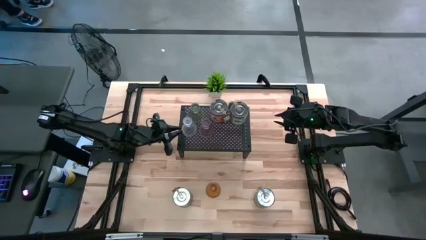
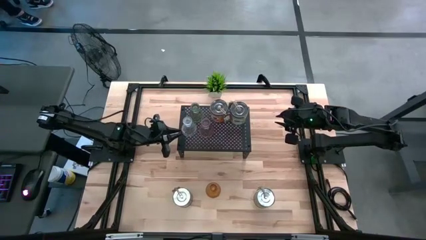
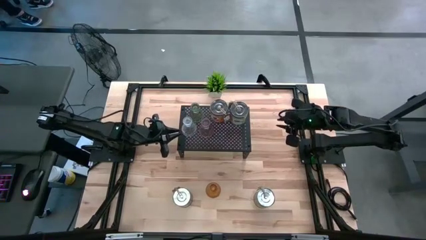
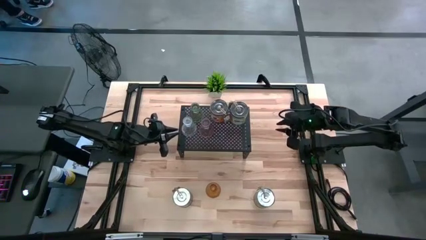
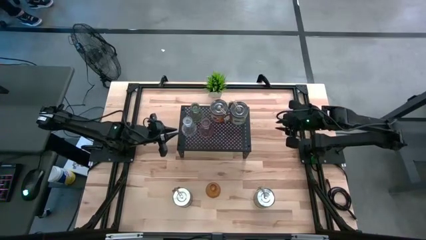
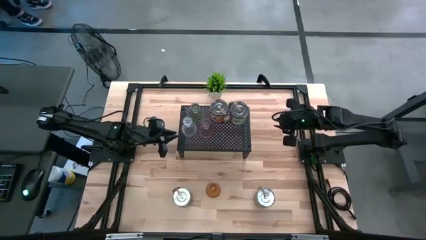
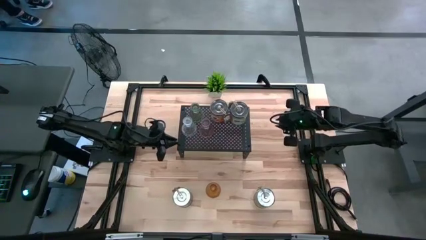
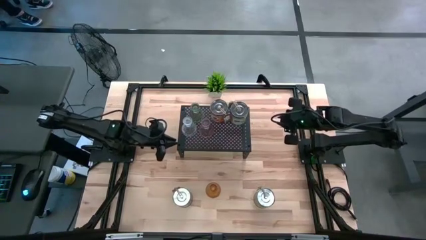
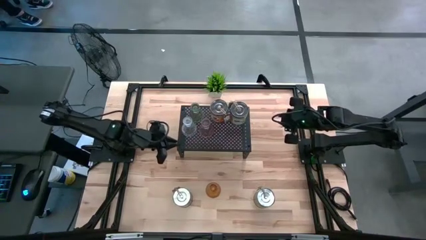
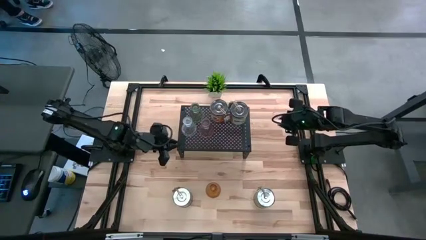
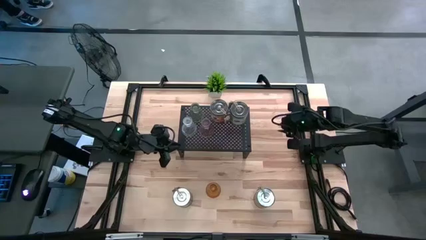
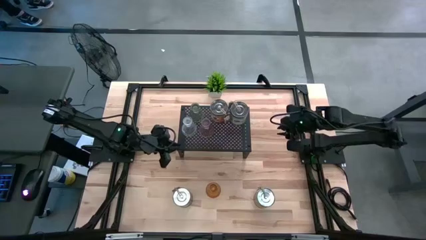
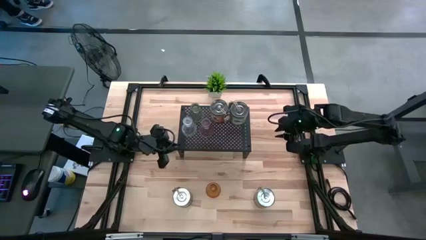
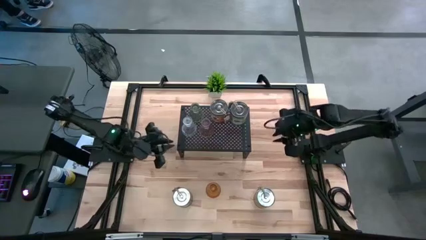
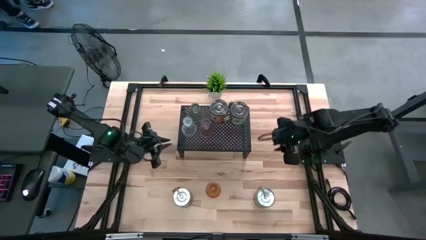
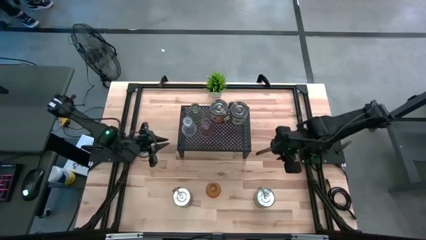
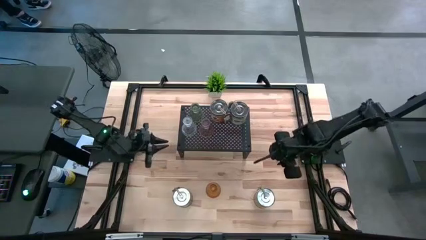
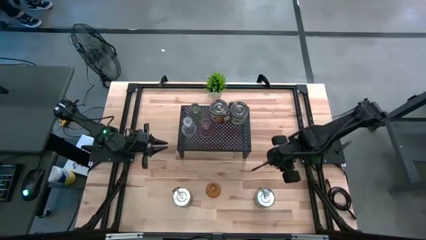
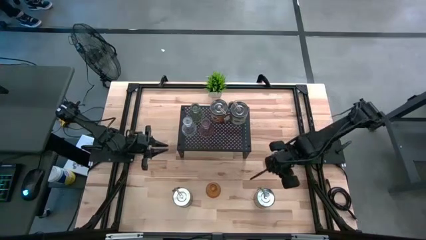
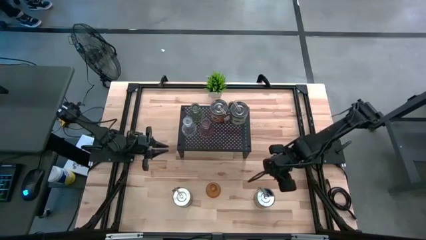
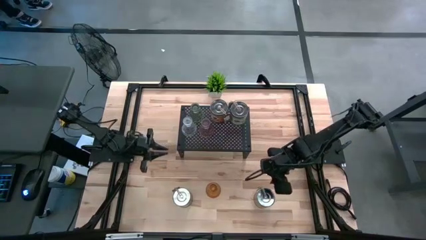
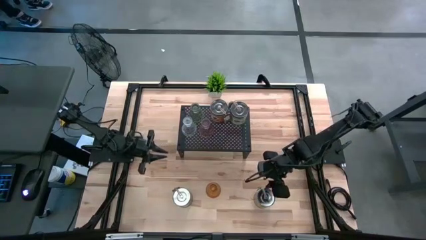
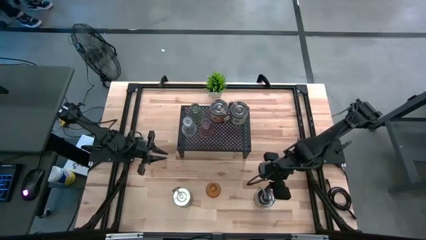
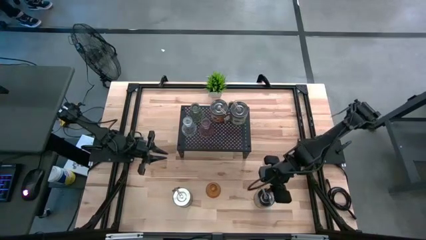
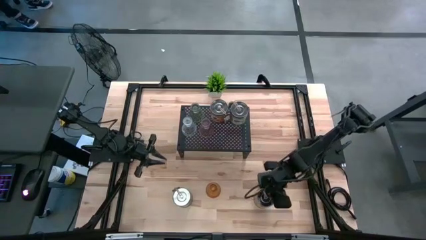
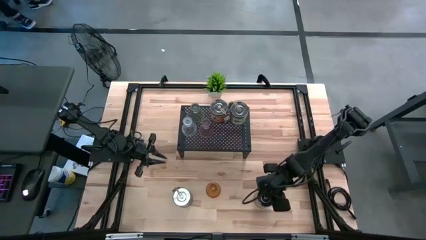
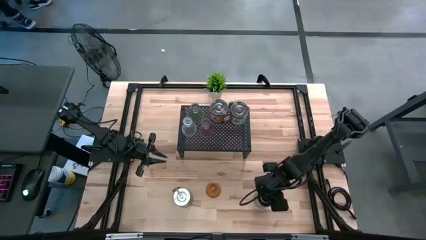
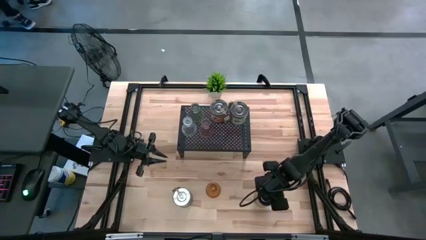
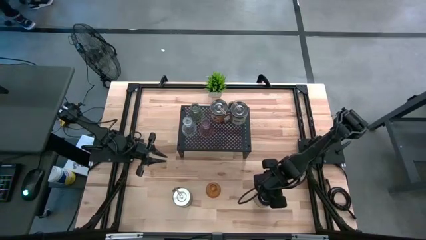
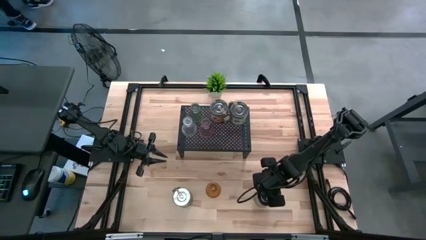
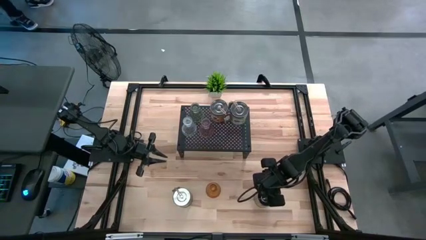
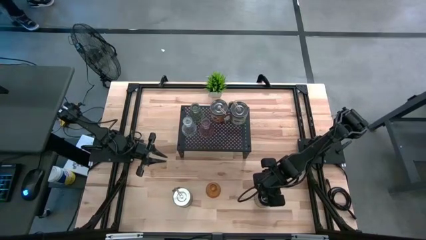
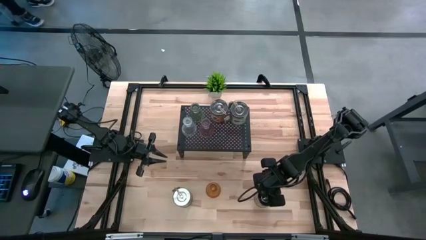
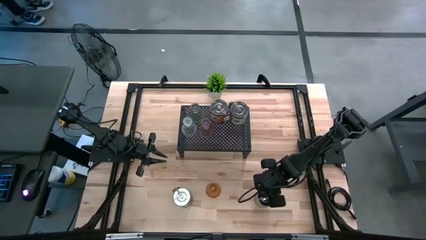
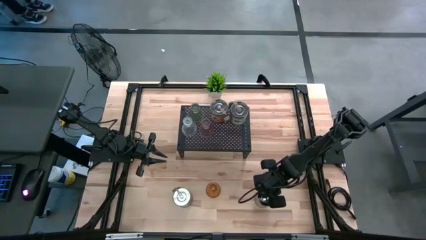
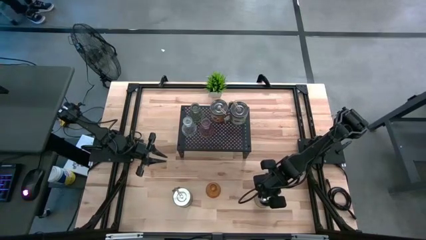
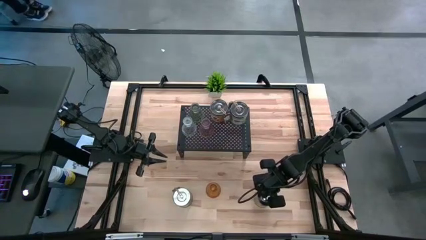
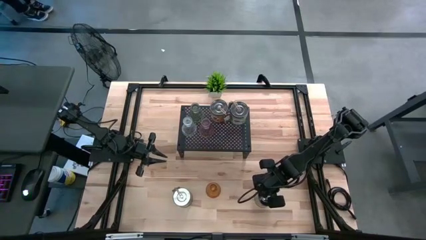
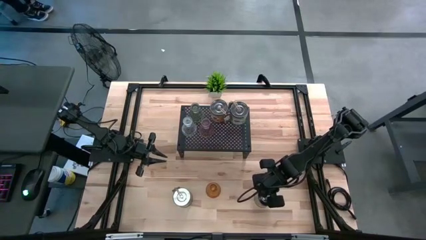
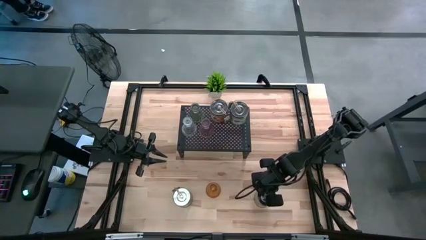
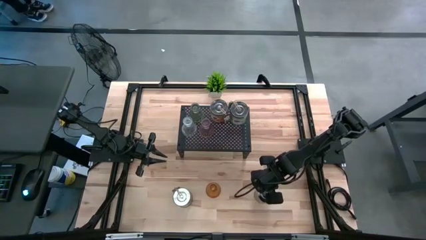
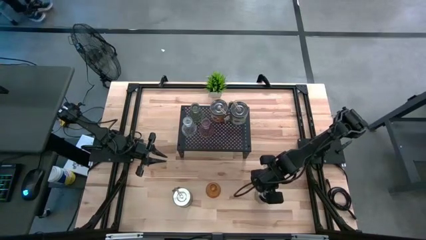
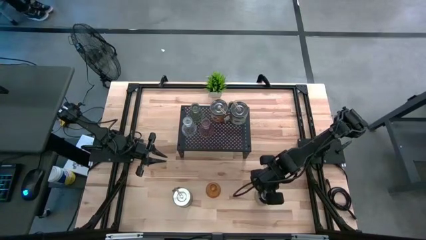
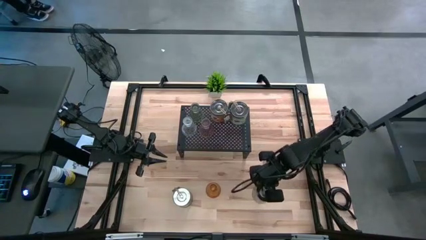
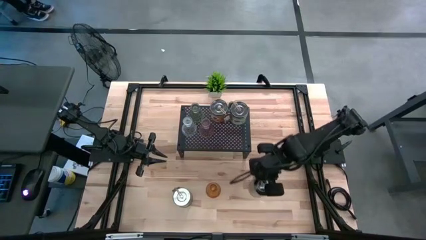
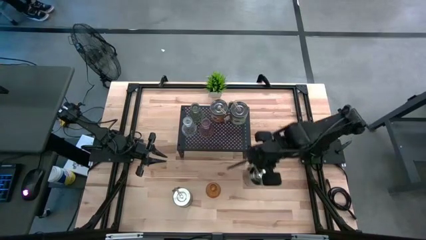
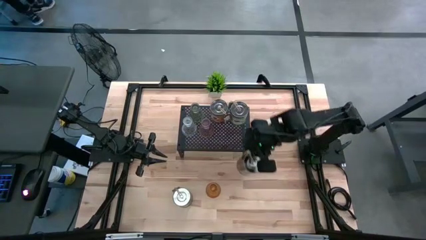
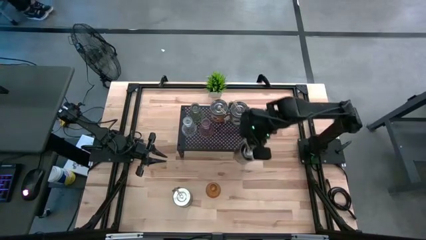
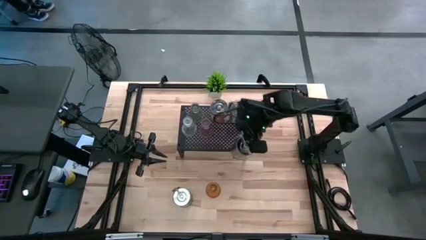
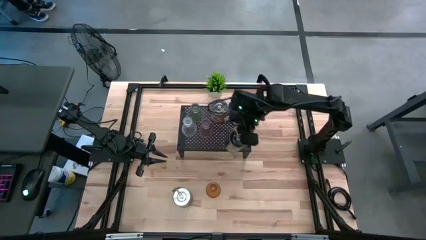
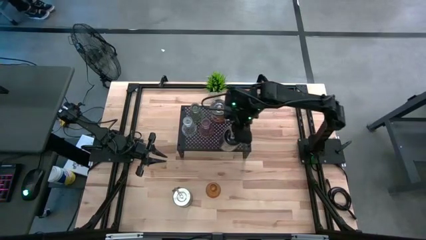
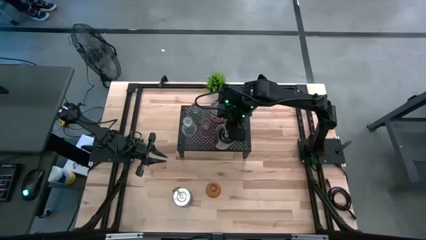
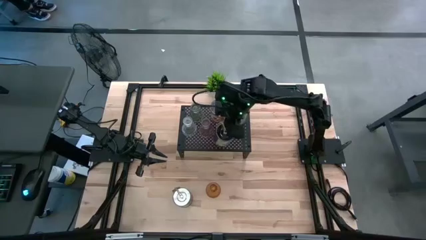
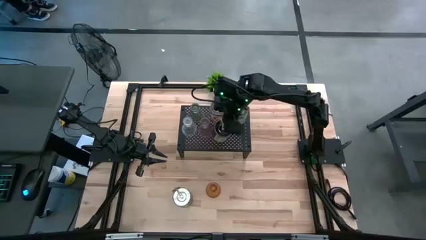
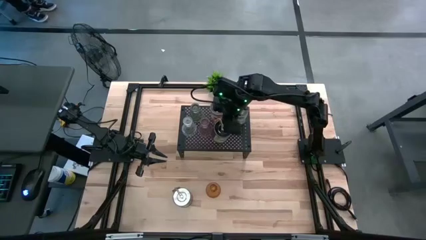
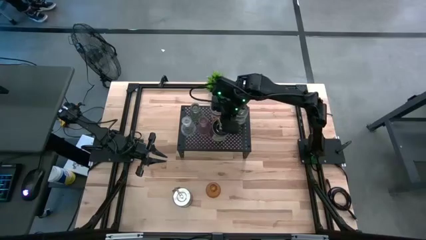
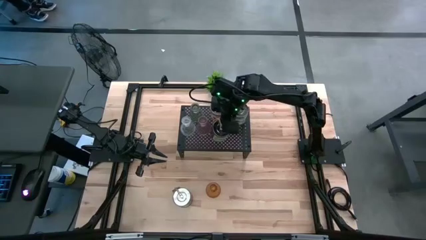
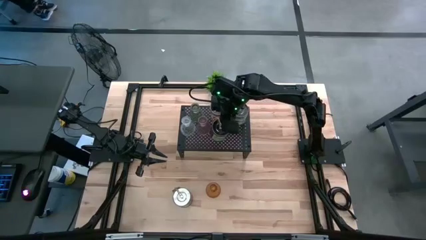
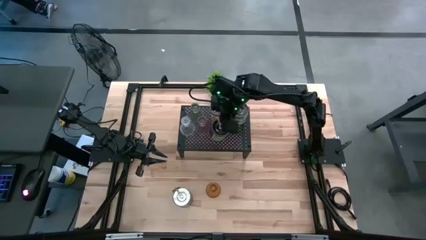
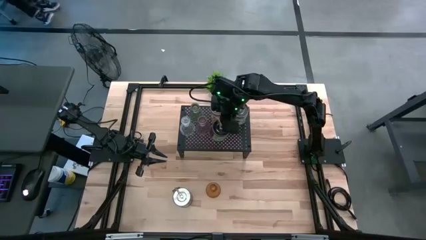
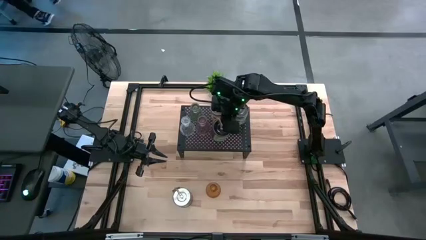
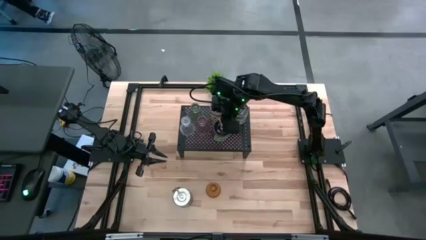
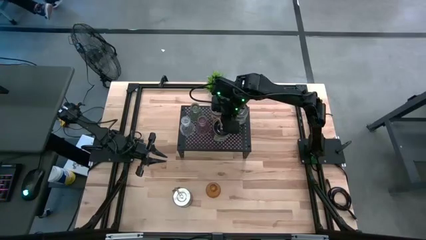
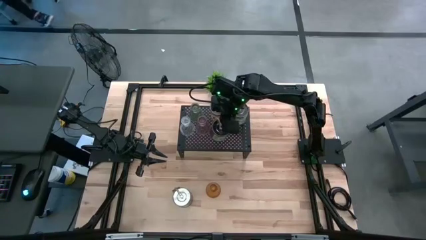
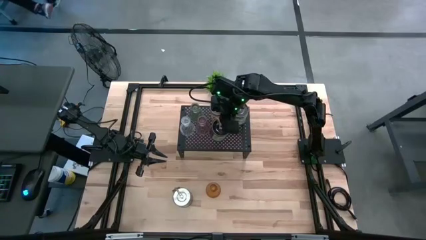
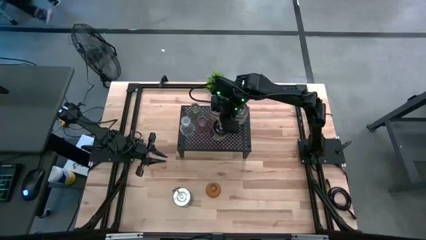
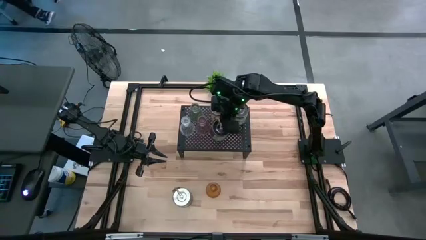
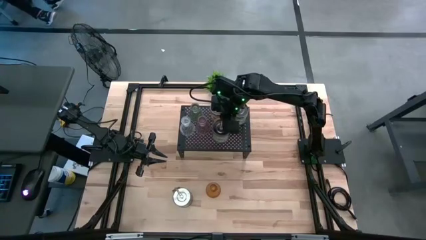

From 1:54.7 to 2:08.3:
Task: Pick & Place candle stick holders
Put the green scented candle on the shelf

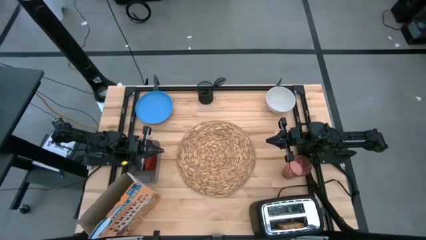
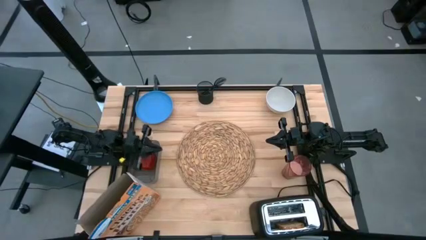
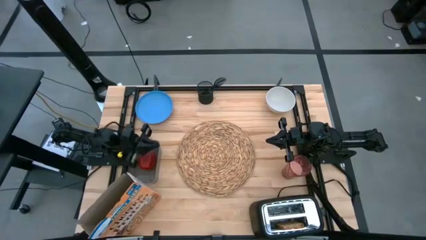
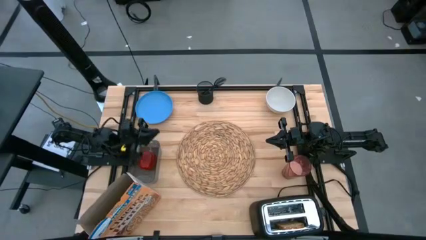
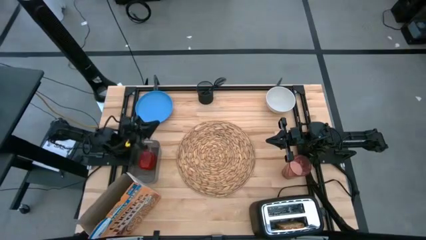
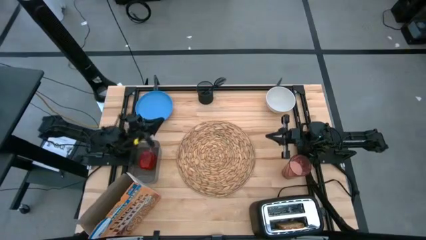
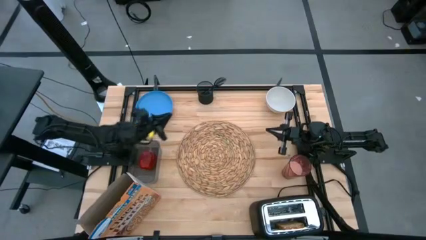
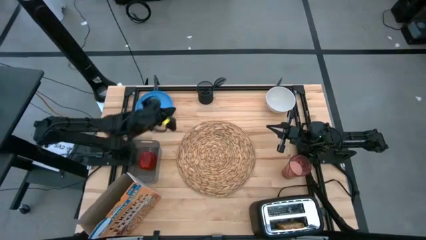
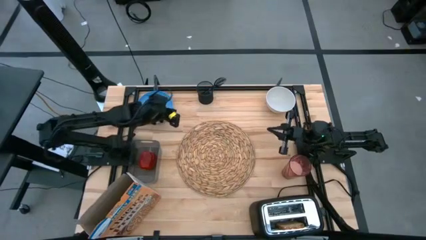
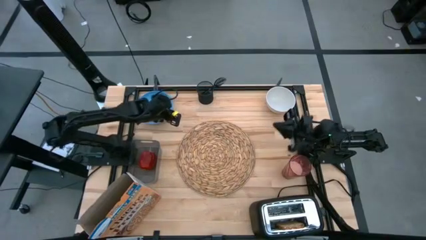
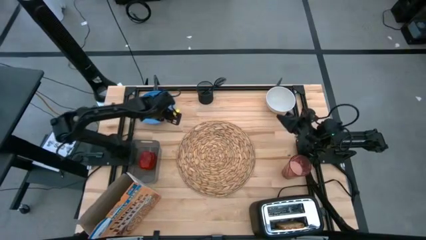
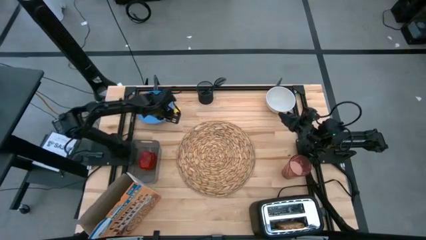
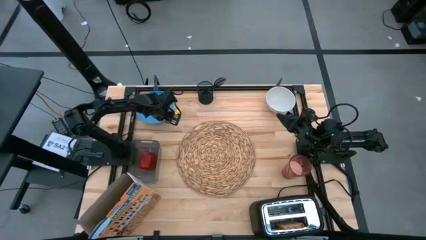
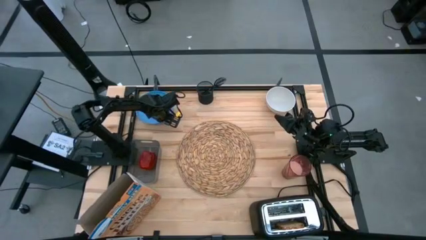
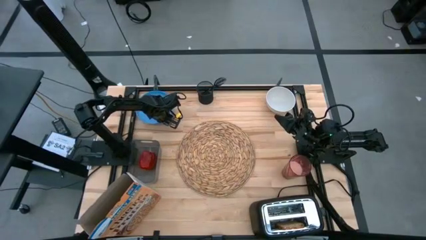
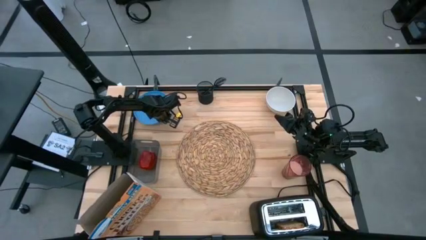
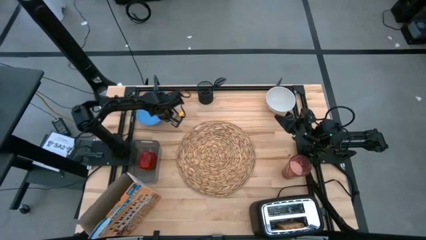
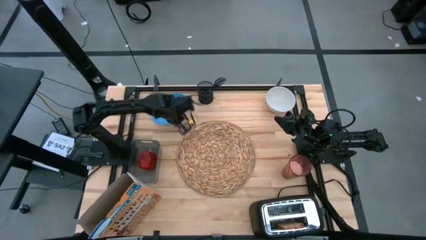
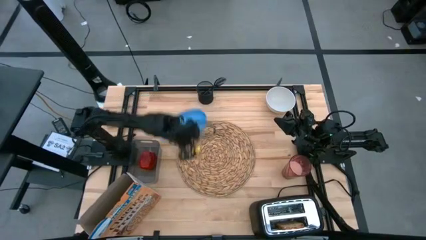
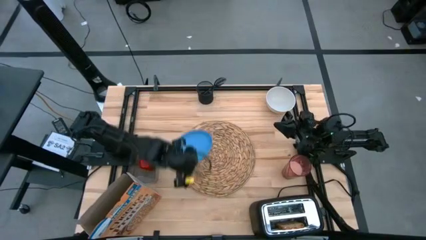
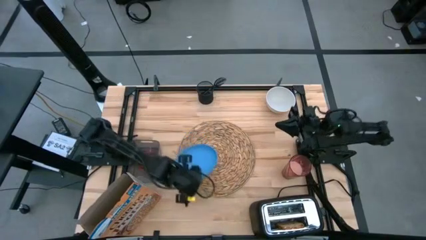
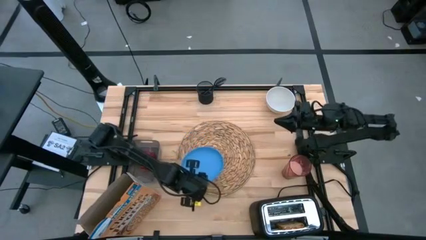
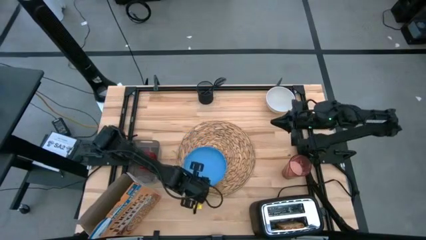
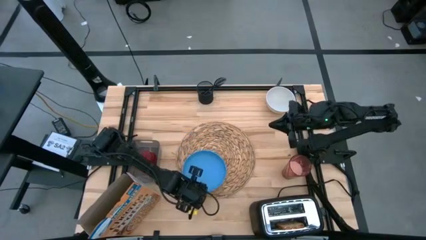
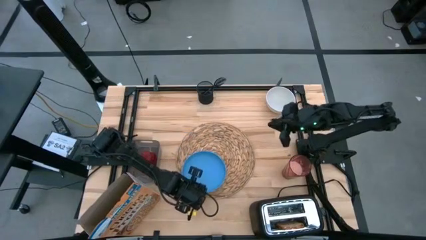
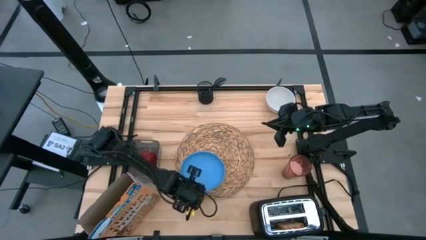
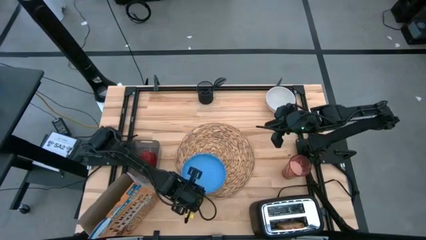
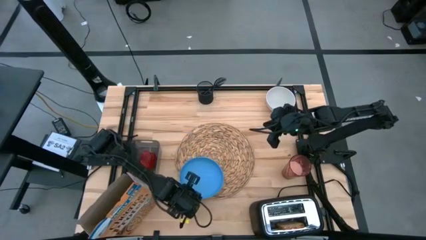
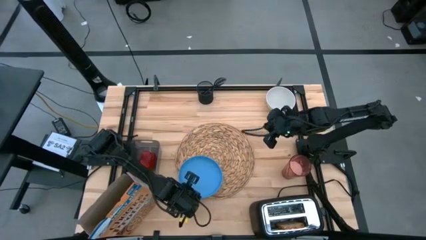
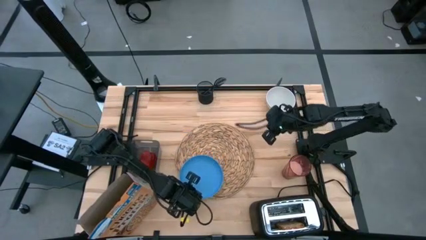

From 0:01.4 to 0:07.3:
Task: Arrange a breakfast setting
Put the blue plate on the brown placemat
